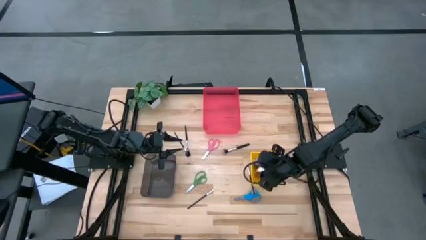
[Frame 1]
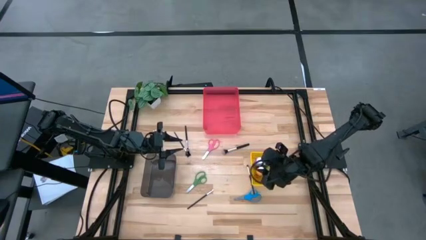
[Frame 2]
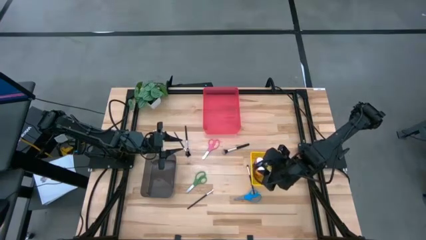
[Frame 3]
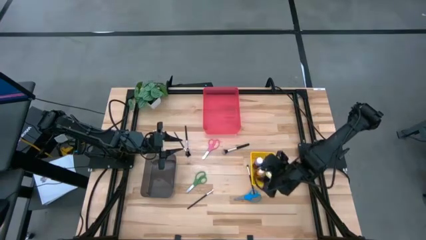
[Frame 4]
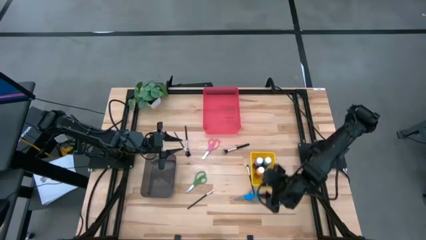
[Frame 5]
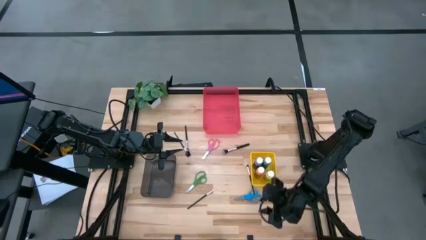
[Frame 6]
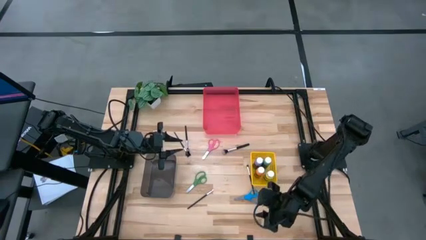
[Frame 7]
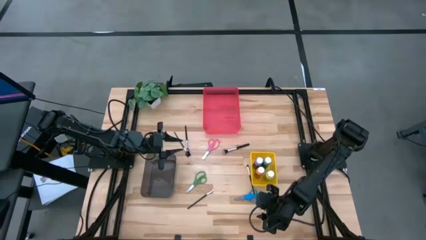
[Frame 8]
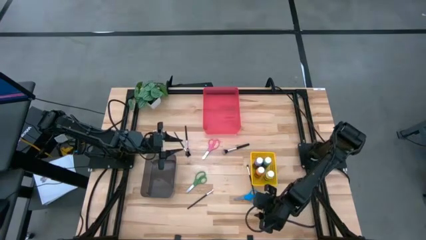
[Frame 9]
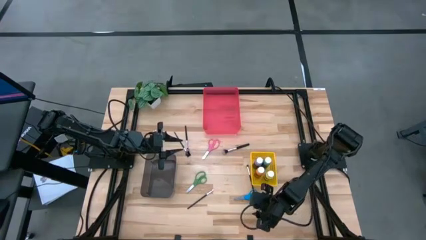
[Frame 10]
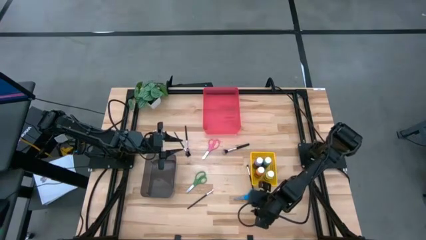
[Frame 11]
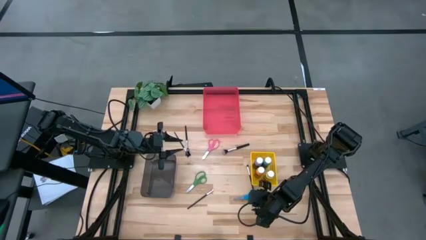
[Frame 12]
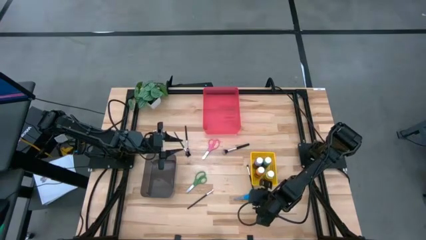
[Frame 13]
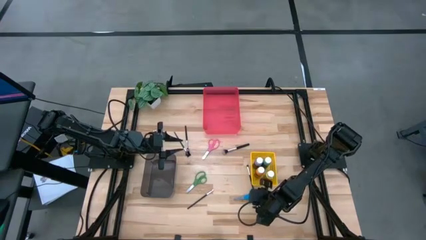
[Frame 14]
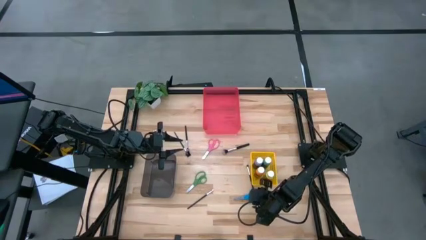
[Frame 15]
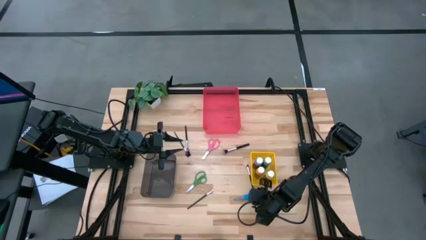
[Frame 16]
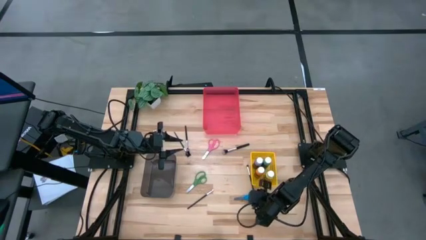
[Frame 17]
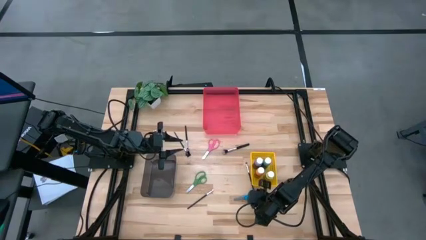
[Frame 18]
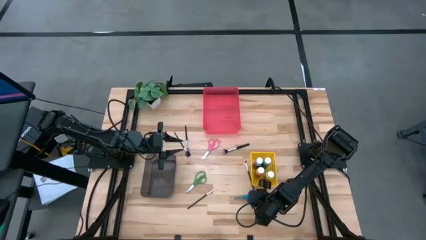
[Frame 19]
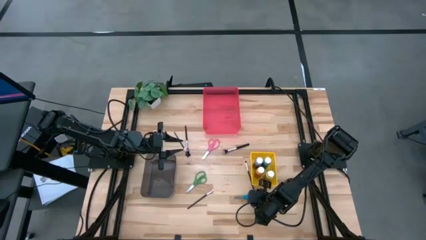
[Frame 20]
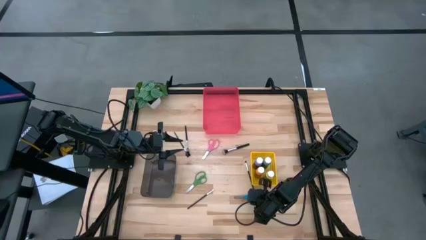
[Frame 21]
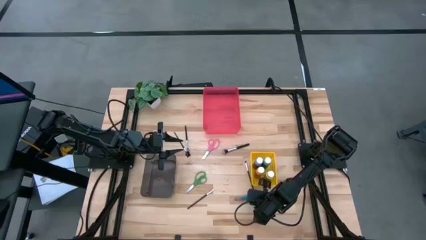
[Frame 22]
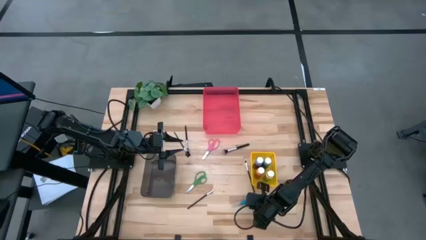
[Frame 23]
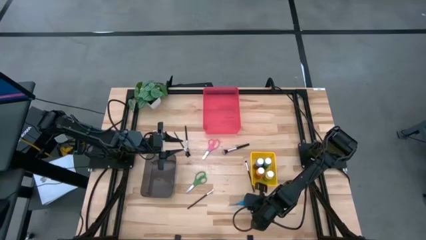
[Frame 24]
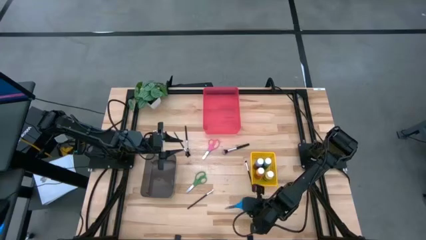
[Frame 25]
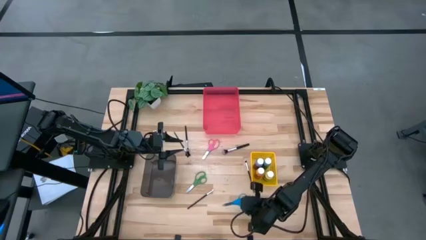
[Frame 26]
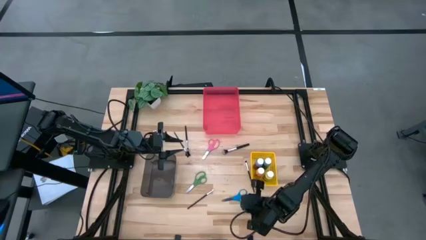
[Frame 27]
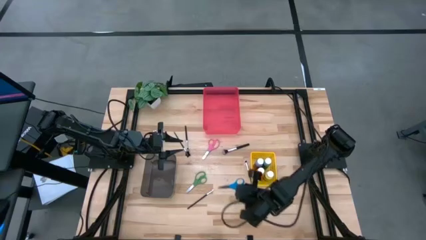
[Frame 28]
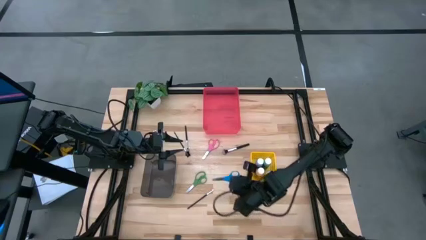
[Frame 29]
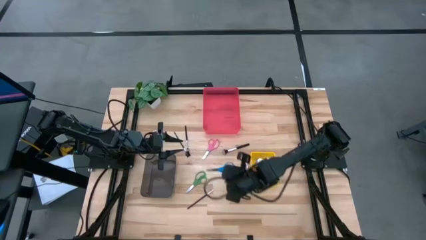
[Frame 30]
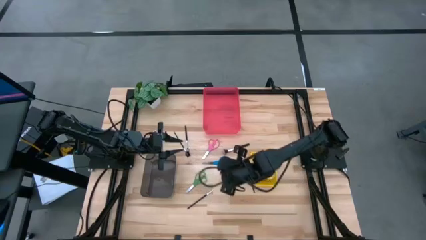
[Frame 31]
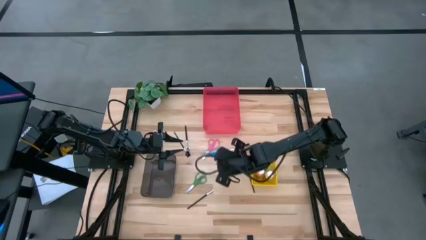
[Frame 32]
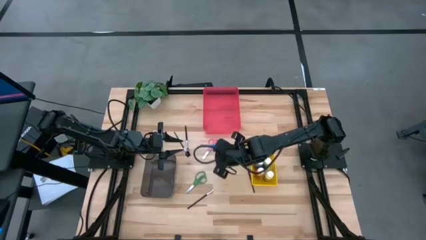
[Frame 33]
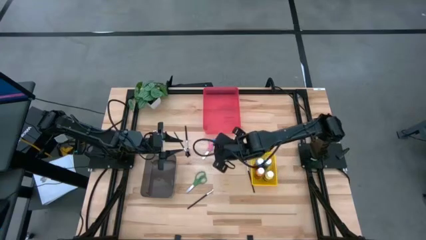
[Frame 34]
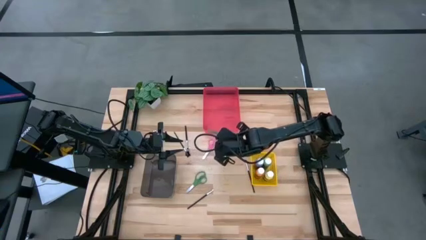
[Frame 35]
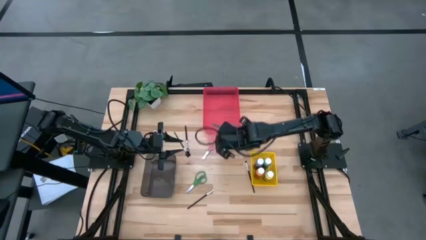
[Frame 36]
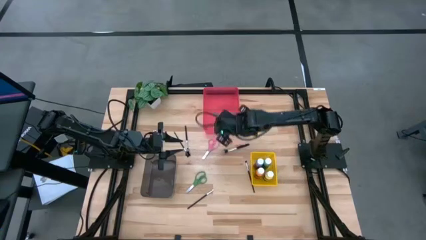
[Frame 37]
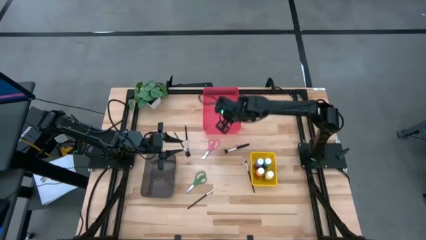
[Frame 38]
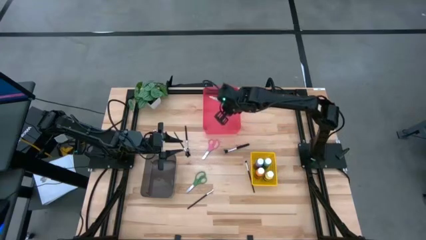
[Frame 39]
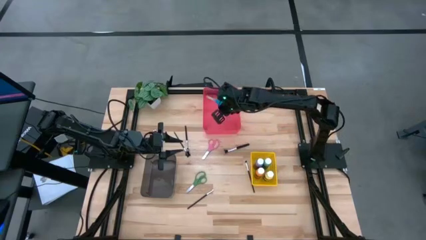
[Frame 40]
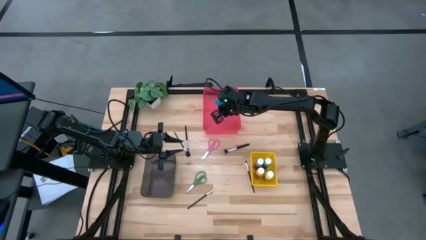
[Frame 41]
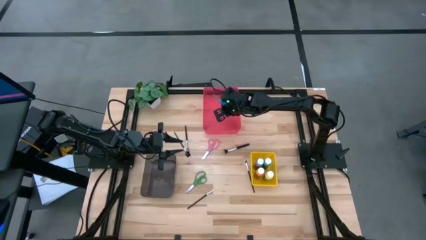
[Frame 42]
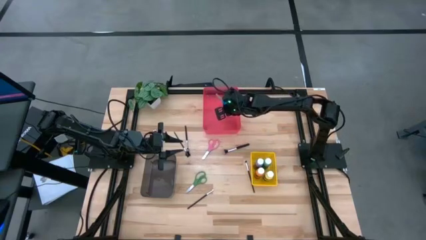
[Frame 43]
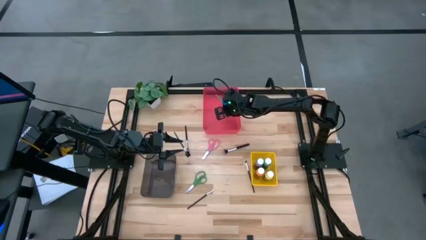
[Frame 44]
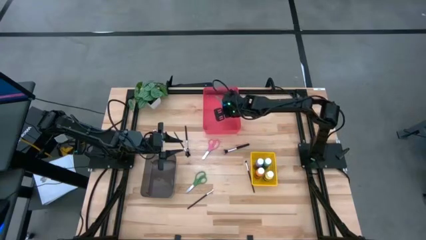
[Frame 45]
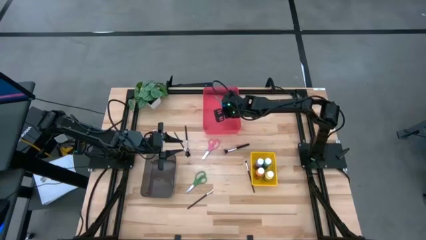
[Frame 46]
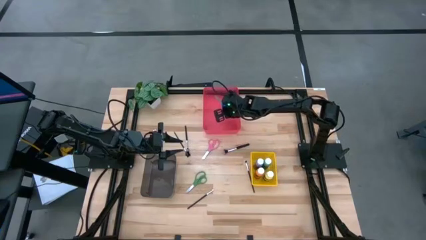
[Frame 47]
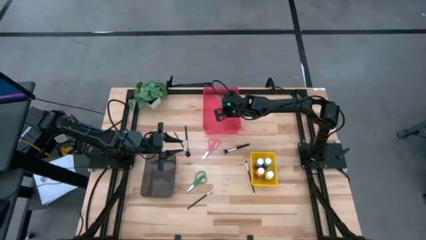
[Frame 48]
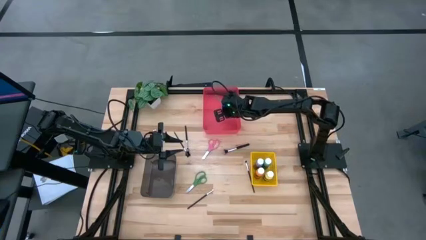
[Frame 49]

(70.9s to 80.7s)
Task: Pick & Place Paint Supplies
Put the blue scissors into the pink bin

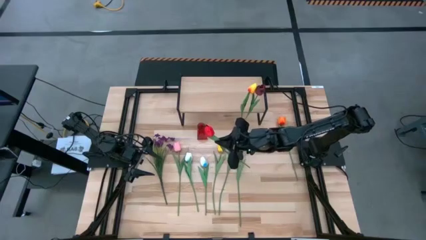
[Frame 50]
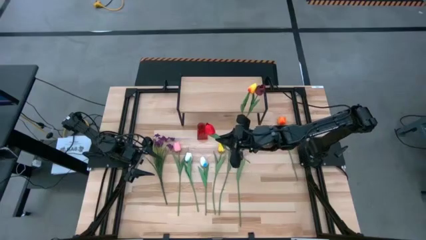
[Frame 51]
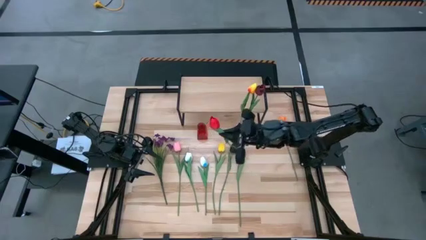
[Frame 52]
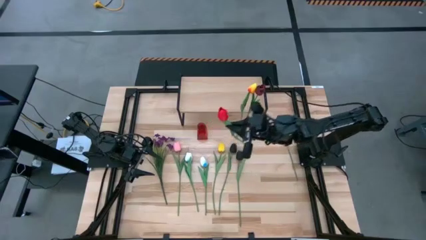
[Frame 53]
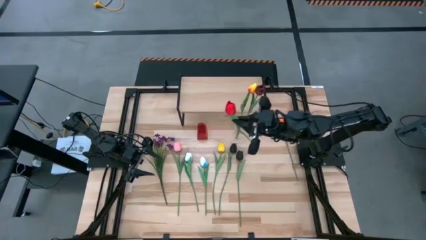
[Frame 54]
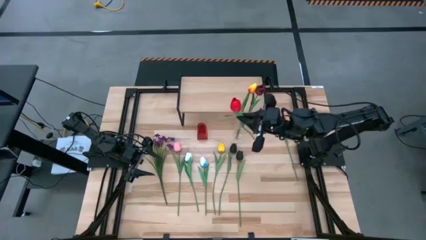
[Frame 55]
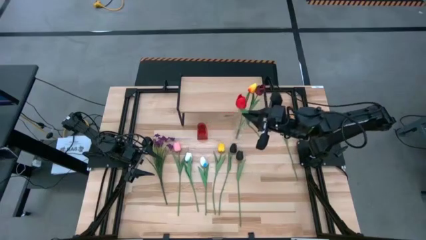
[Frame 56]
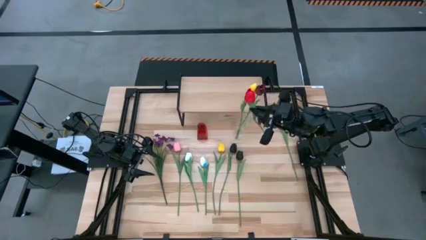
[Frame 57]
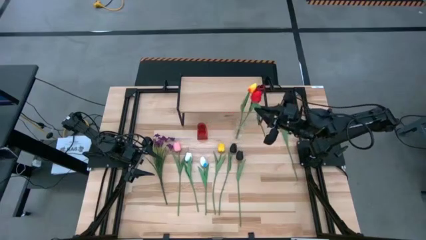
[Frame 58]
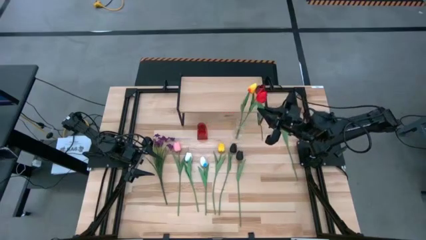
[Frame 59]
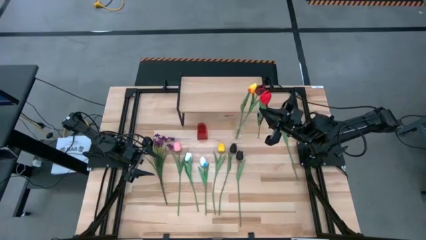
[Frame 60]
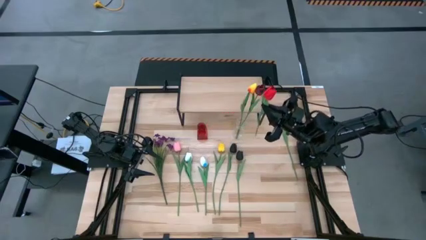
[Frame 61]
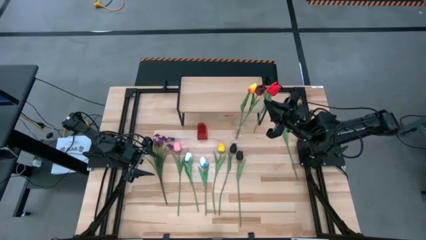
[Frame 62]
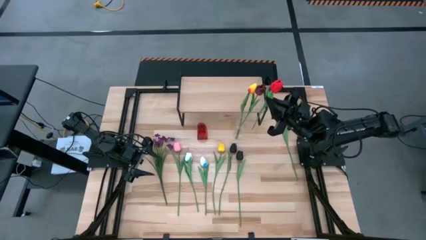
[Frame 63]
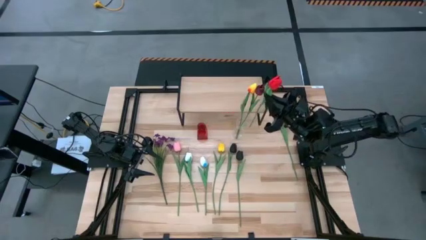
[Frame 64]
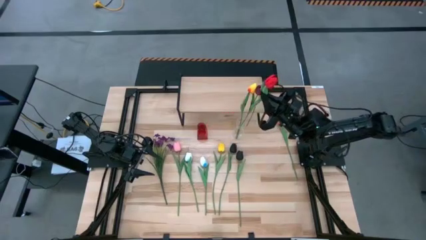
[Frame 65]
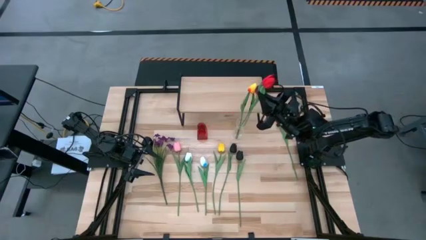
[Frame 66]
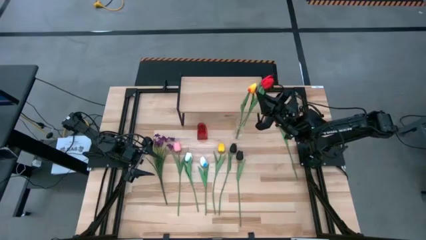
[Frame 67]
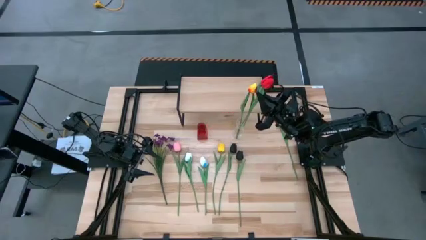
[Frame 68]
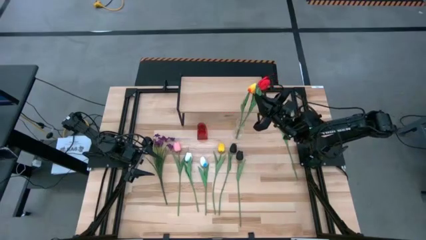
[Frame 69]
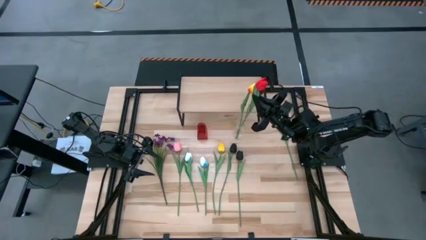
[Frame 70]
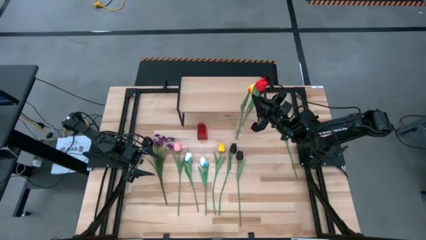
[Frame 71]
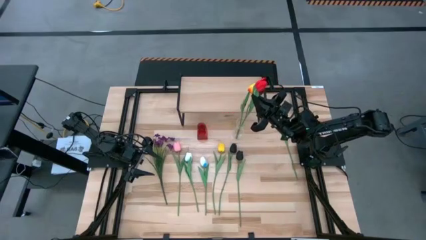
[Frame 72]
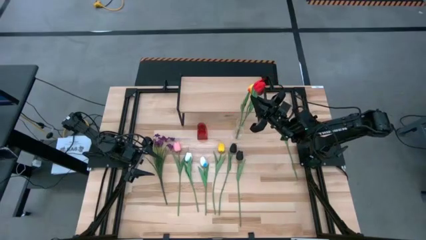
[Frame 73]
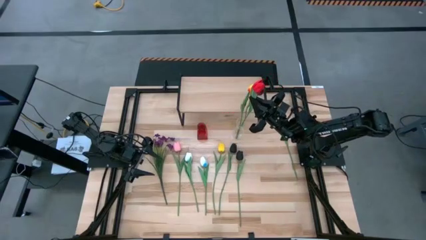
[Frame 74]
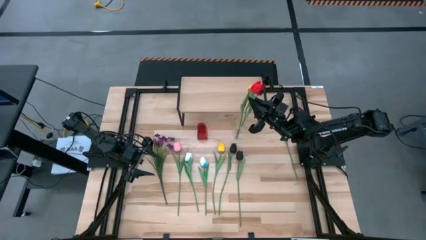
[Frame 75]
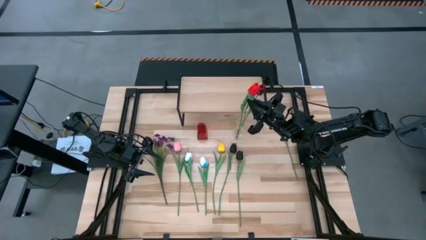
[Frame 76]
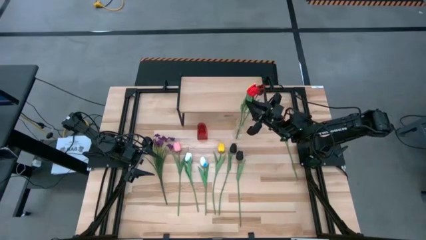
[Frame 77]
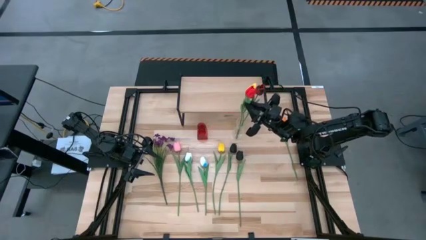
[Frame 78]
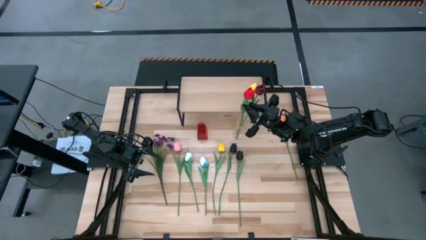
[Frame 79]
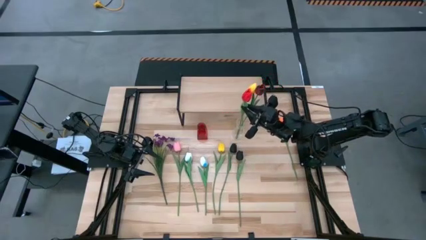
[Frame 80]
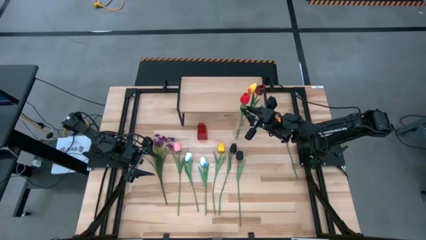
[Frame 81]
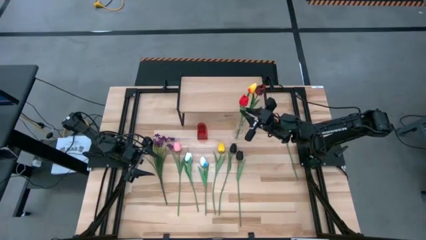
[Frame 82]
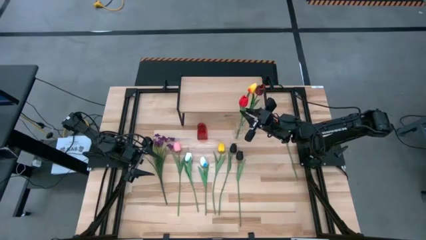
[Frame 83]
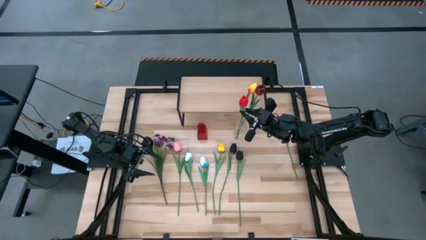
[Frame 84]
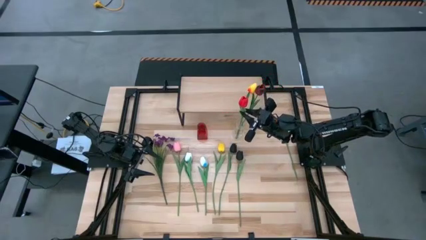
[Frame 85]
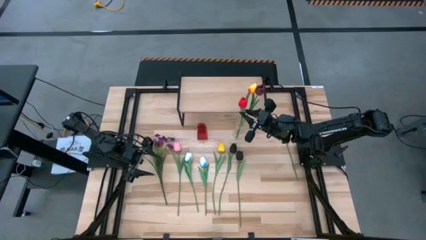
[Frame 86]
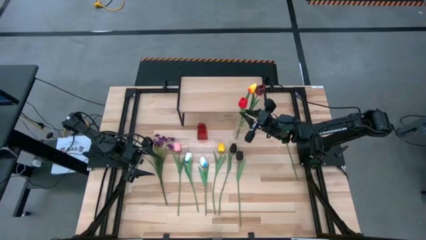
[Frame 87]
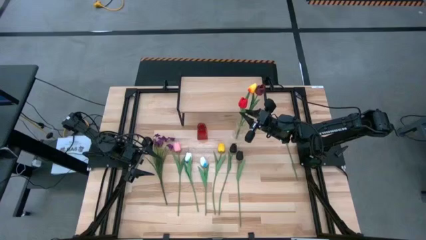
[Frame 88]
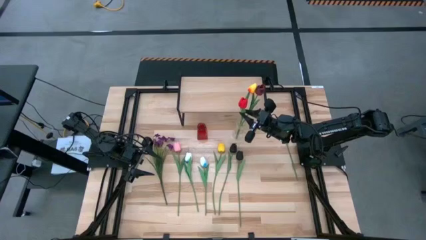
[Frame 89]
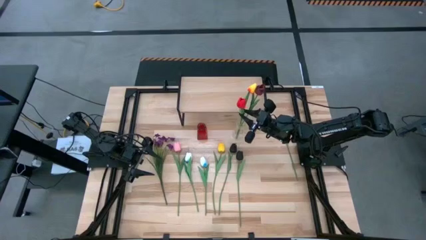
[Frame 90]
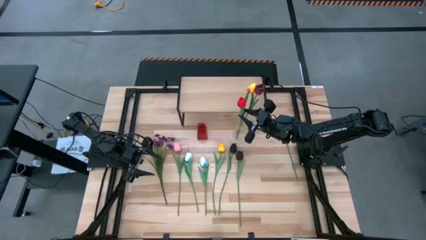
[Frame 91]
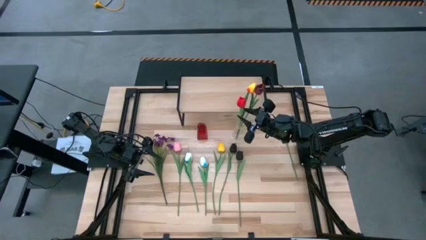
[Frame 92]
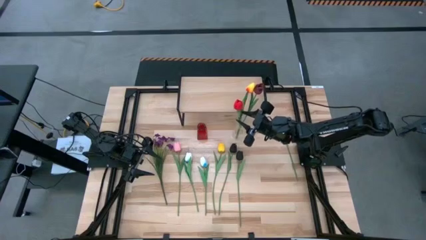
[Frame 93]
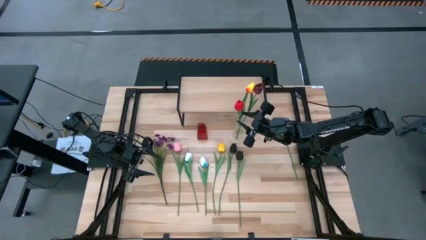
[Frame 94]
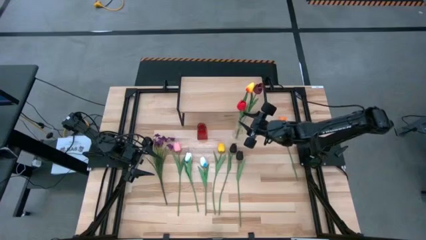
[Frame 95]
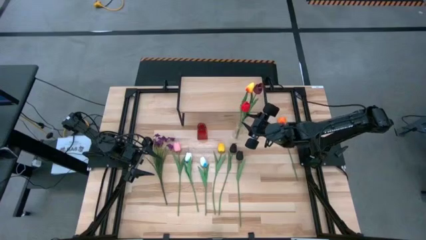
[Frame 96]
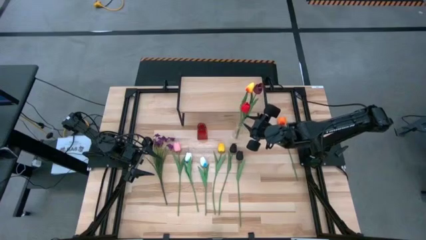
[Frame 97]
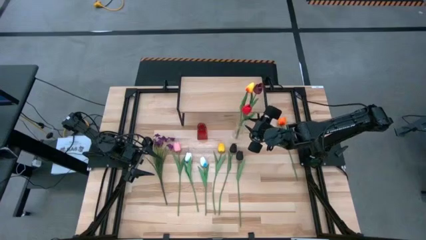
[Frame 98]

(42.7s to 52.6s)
Task: Pick and place flowers into a vace then onto a shelf
Put the red flower into the transparent vase
